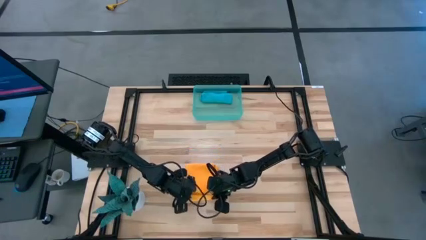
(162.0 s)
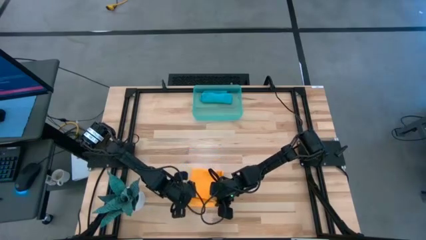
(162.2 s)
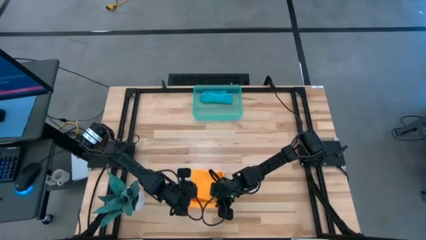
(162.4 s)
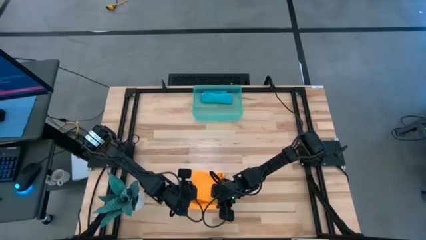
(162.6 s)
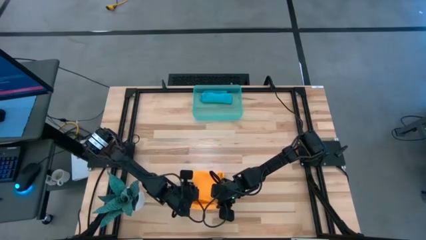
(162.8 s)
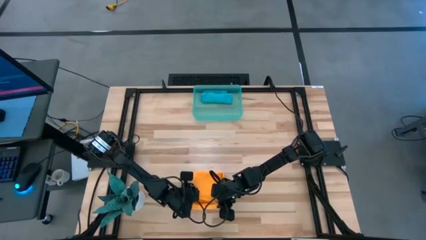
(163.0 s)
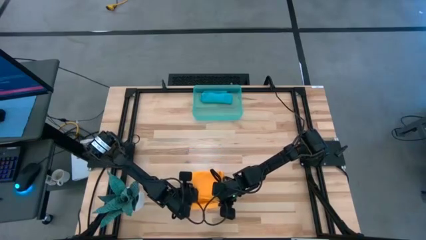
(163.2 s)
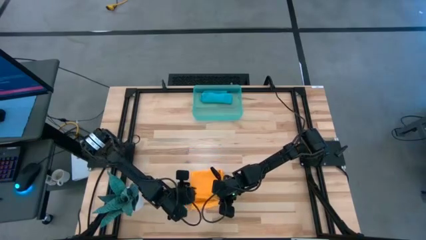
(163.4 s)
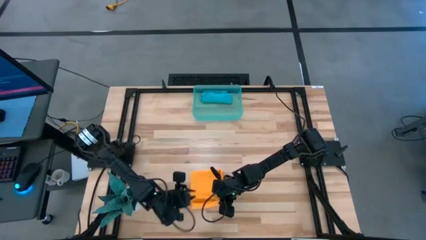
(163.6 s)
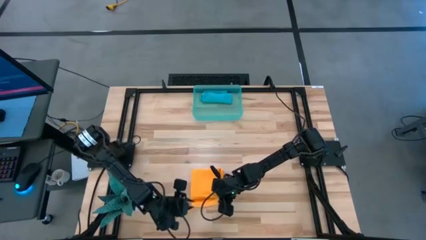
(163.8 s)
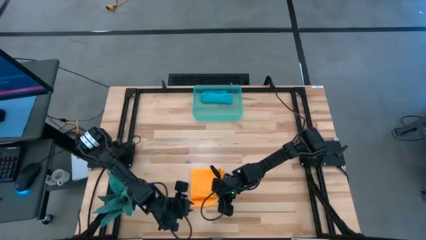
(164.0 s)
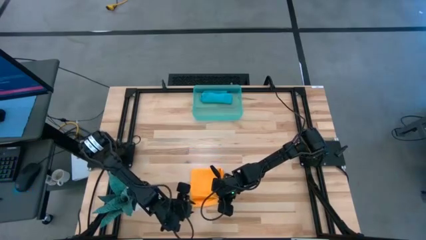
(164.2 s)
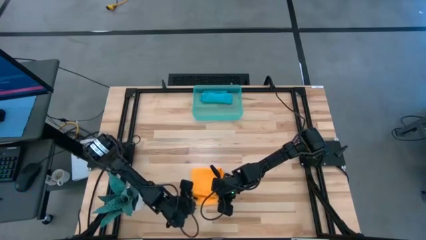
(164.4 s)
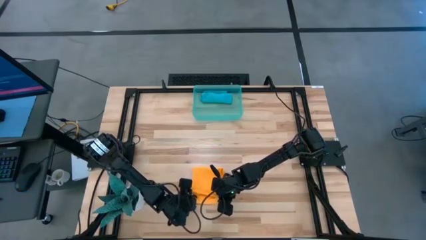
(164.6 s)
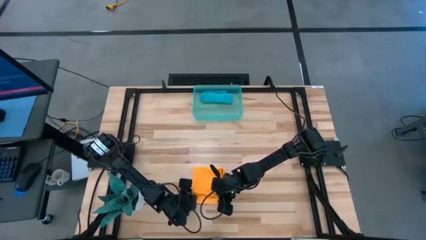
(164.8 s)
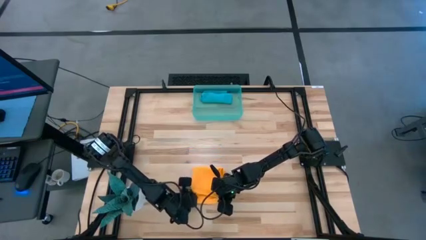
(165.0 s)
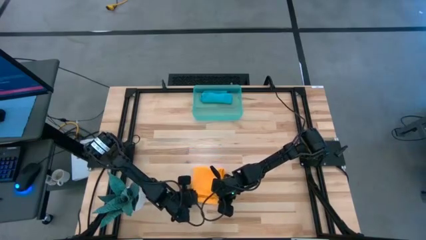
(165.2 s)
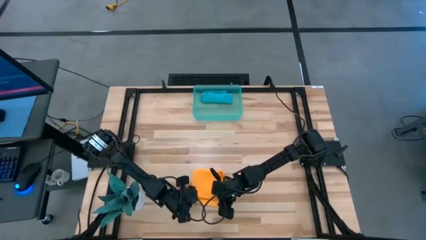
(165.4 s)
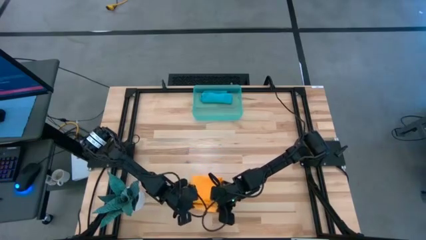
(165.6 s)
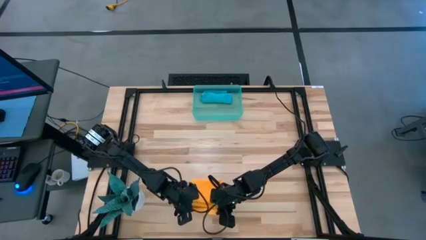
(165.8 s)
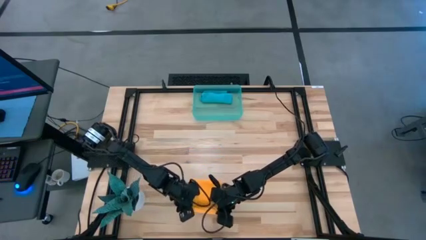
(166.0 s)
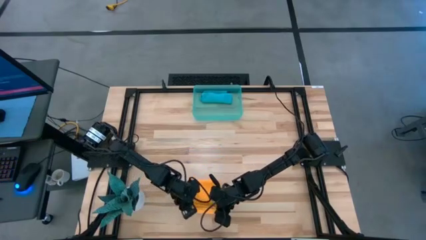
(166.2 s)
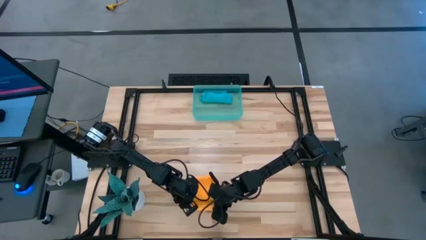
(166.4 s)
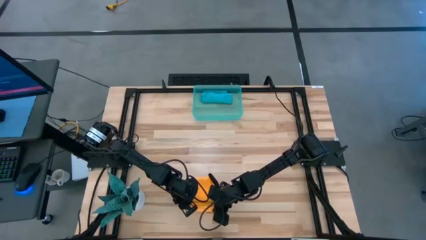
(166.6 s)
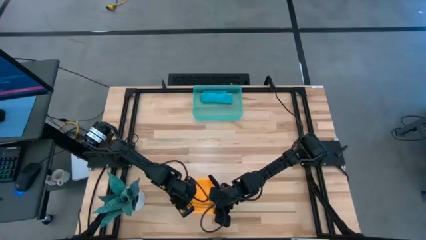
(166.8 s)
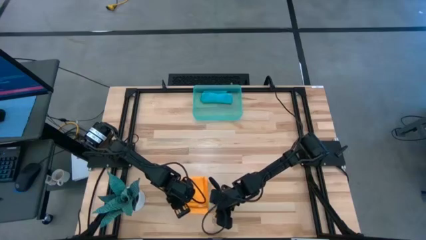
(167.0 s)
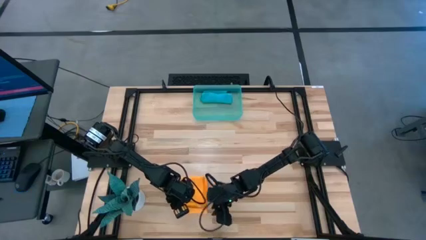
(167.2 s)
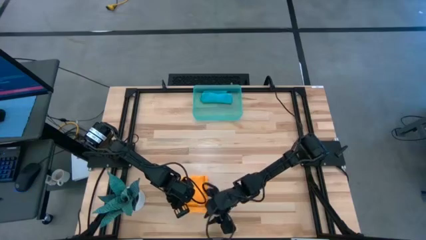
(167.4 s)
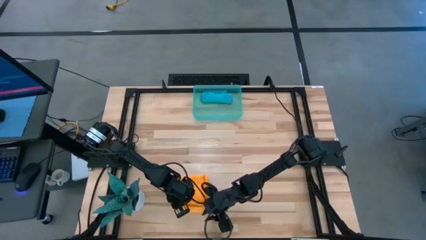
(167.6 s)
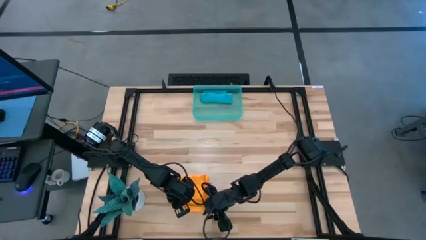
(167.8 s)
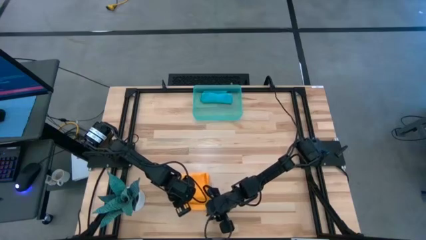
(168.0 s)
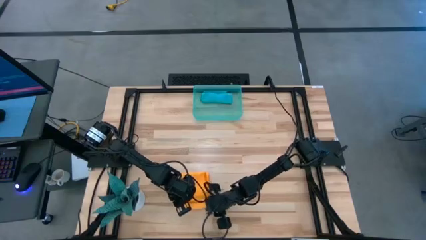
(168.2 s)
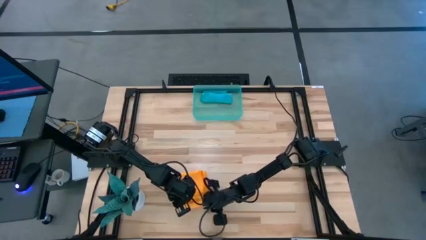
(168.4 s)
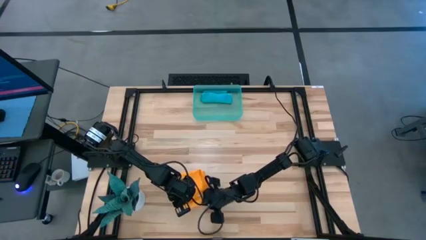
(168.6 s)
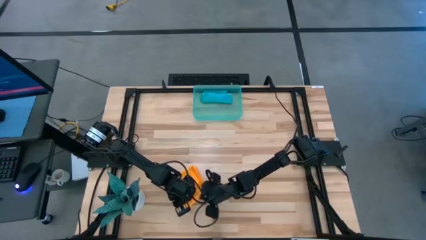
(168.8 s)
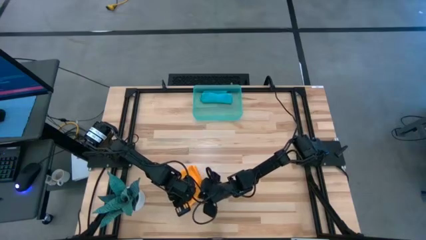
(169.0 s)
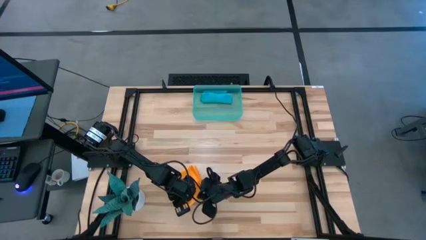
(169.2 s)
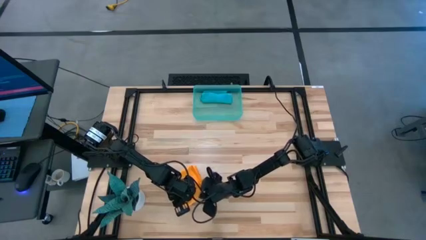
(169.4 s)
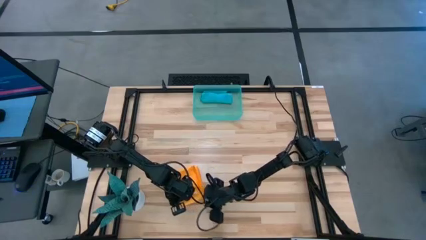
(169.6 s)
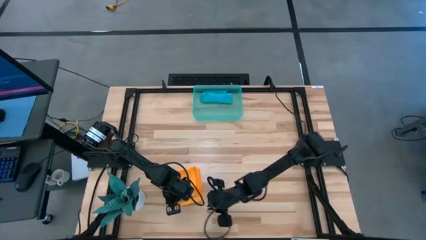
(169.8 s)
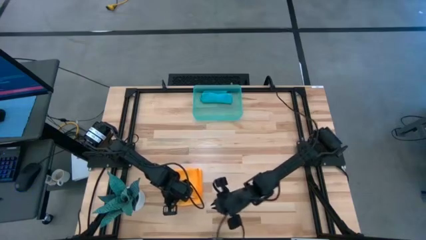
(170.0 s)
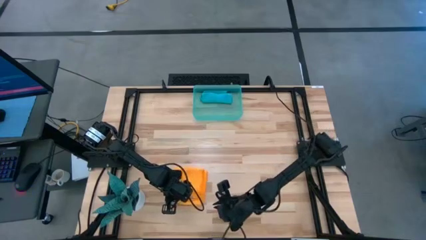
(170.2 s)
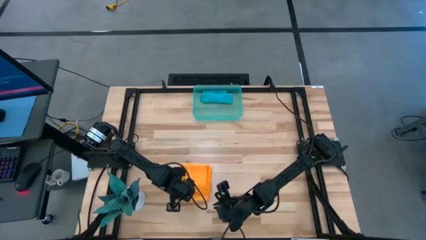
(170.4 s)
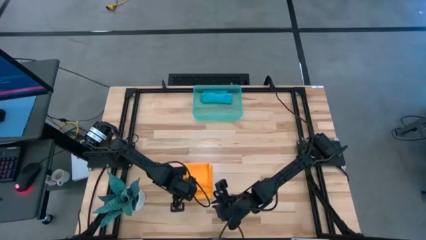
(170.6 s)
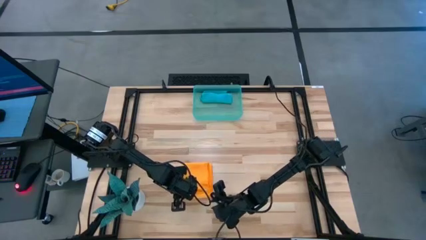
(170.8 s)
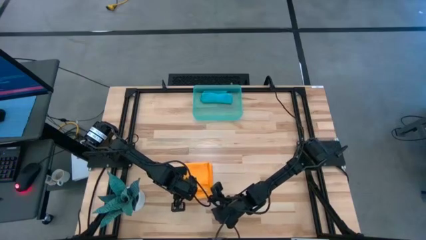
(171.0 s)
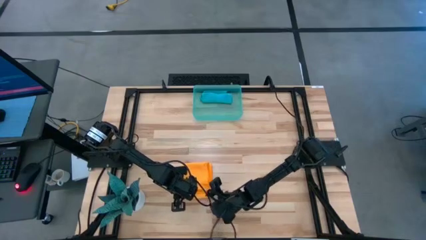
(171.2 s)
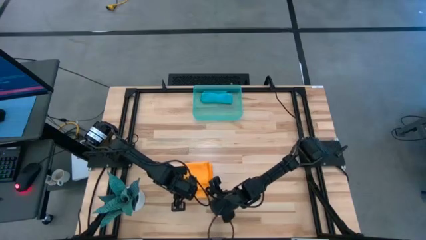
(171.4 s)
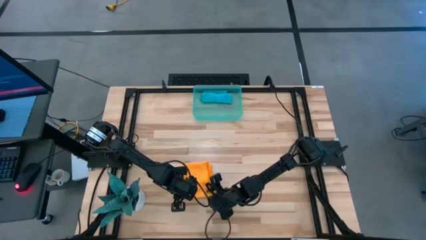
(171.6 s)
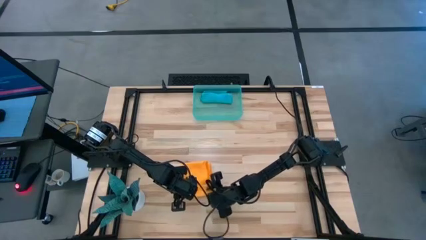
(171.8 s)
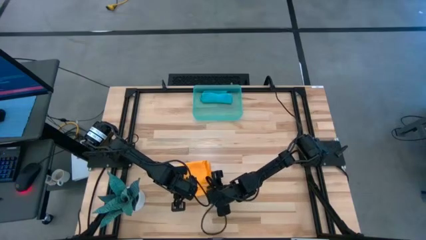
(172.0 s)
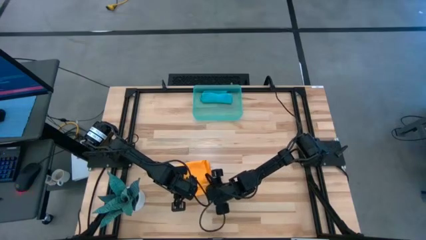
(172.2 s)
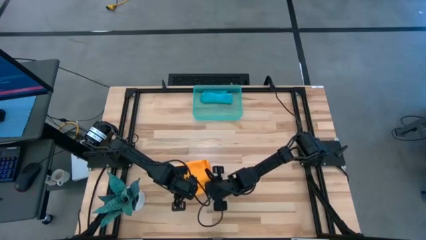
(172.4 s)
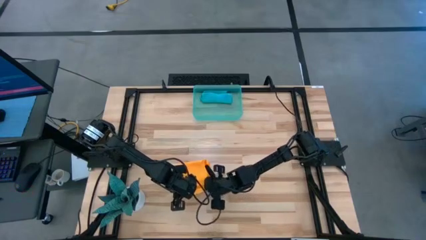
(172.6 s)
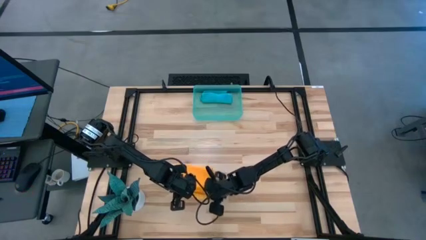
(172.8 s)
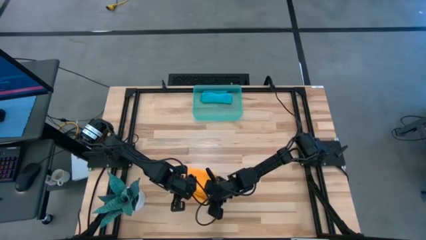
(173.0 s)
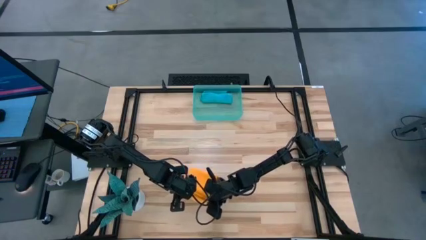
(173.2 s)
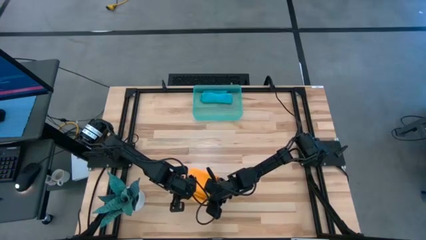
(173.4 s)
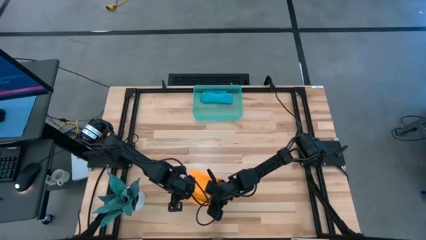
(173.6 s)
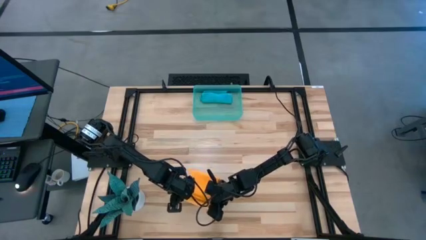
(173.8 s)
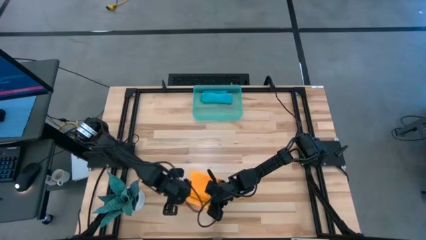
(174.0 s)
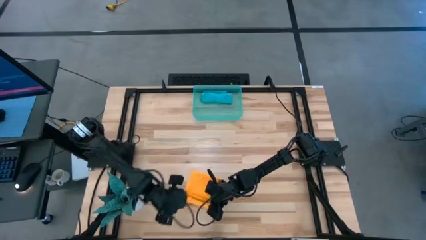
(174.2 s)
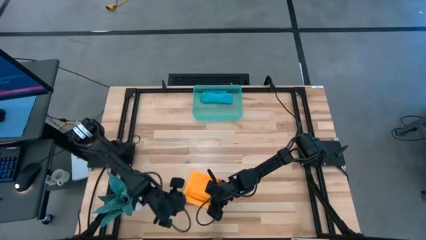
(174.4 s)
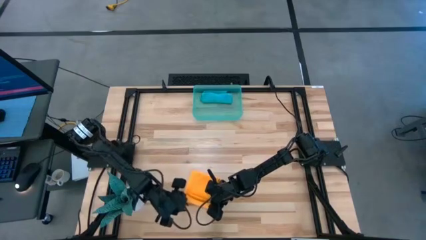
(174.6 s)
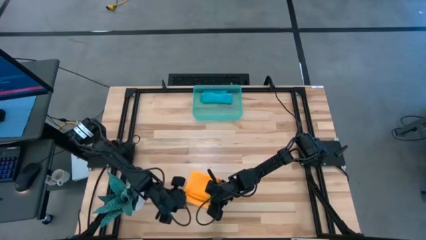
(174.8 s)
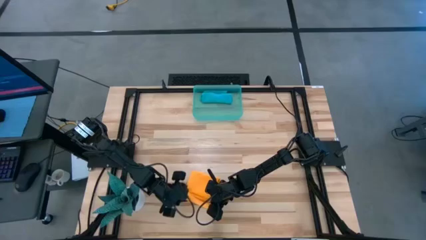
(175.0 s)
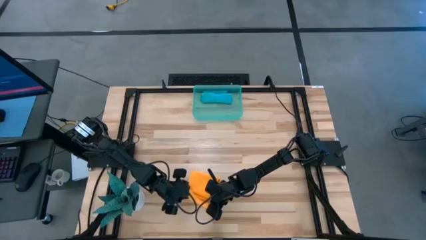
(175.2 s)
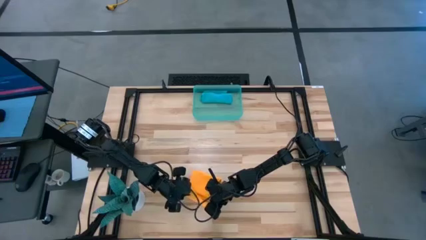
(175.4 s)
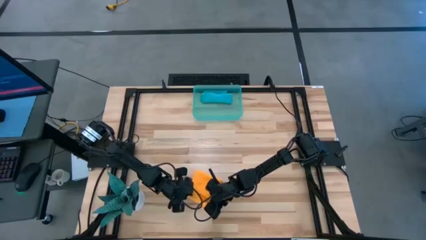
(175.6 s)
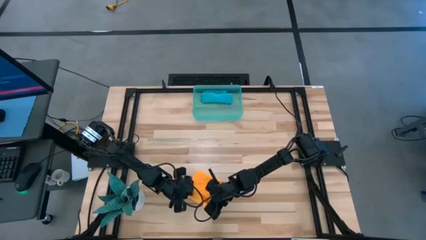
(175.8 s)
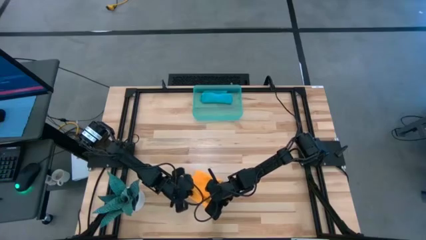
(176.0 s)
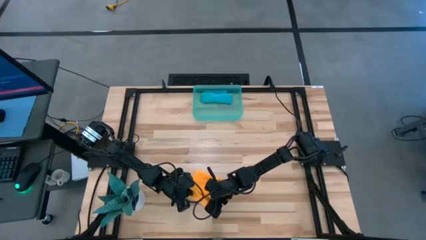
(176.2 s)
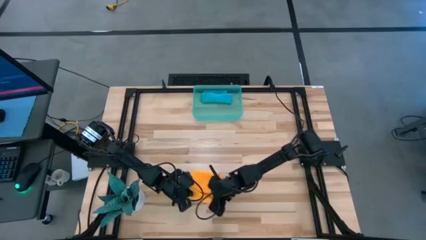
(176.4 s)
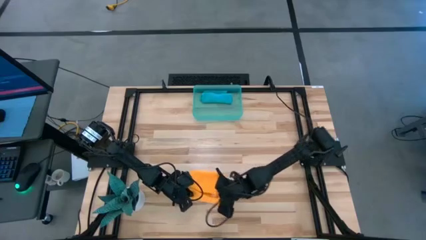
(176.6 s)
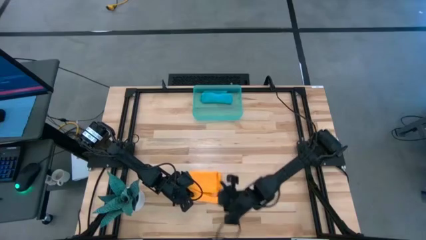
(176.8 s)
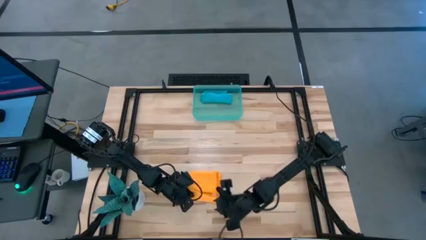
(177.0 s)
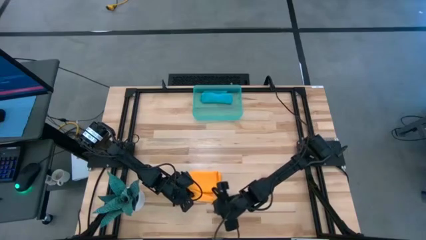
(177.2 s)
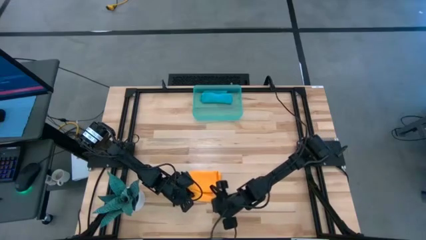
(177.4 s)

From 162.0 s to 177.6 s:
Task: Roll microfiber towels into tight, uniform cylinder then place into a basket
Roll the orange microfiber cloth

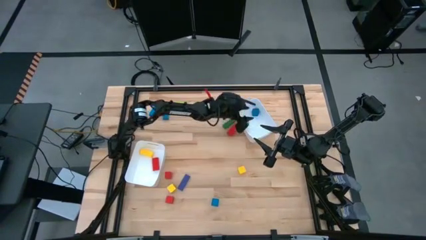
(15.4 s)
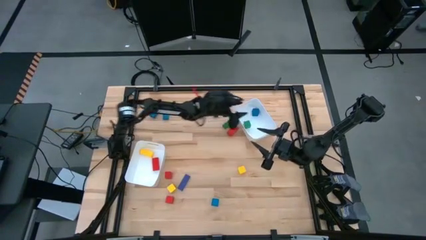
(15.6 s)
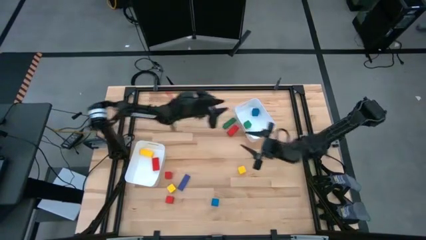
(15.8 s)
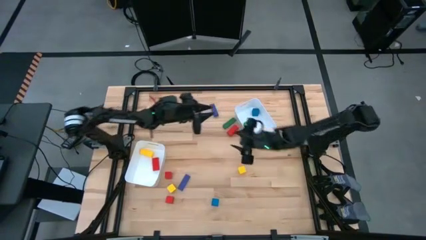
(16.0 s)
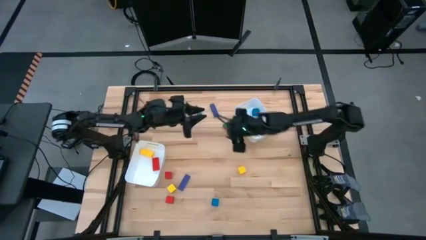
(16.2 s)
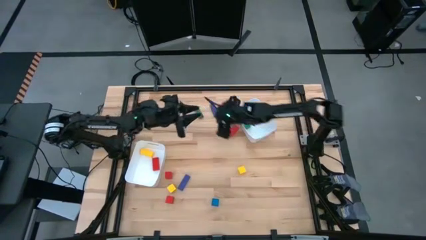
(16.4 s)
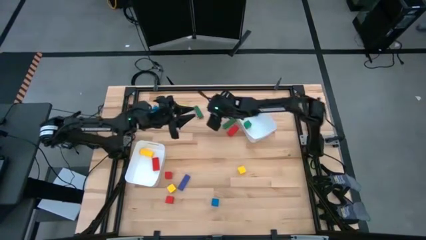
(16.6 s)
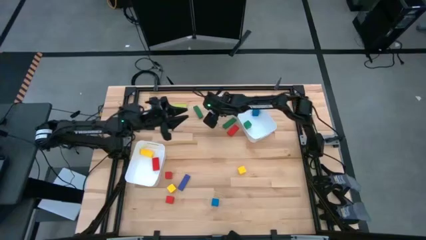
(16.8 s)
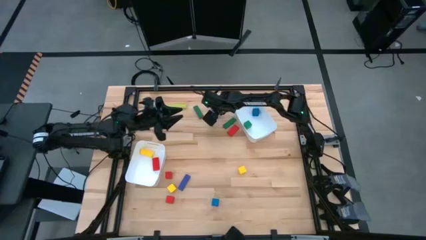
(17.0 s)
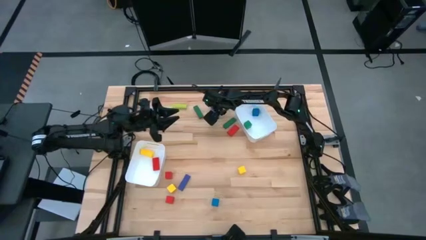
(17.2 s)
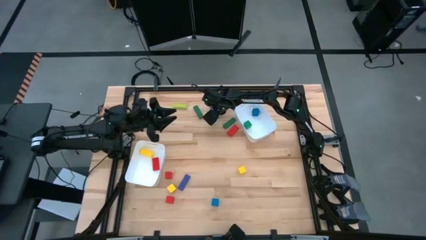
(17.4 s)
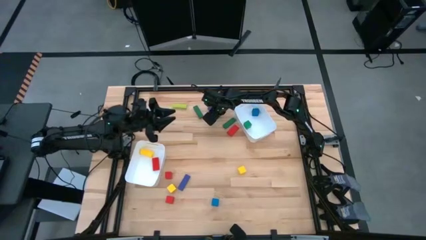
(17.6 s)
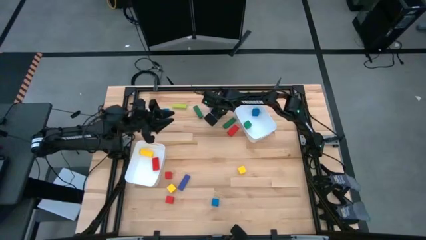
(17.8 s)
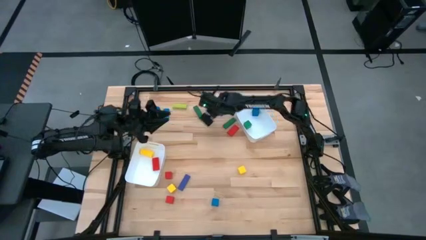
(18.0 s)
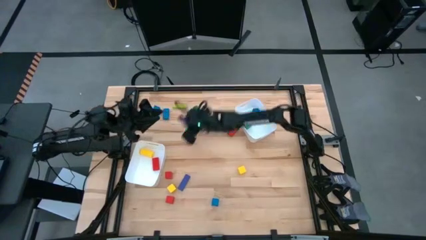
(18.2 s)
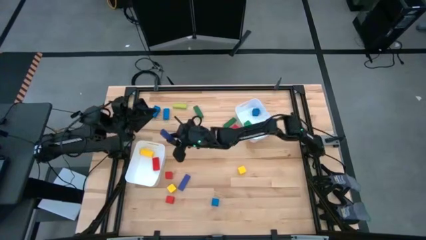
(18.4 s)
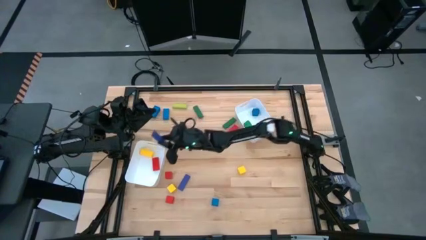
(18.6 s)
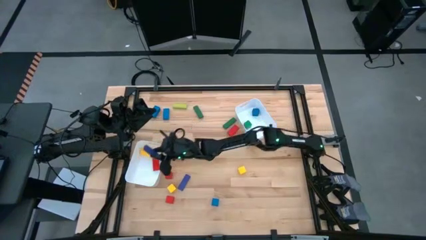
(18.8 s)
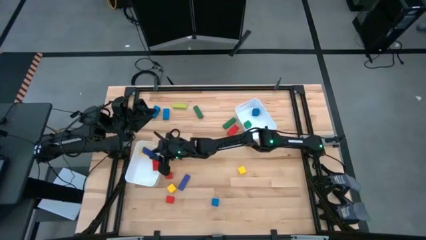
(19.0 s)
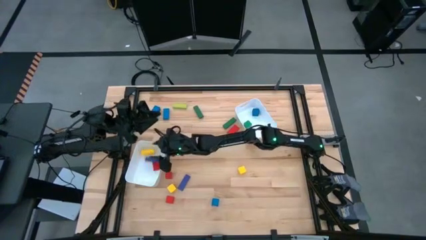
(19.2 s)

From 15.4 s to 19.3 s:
Task: Sort blocks by size
Put the large purple block into the left white bin
